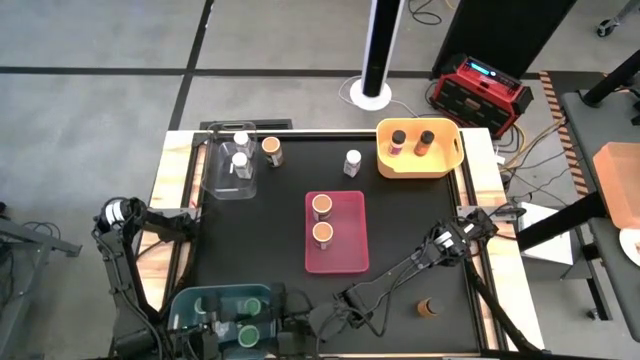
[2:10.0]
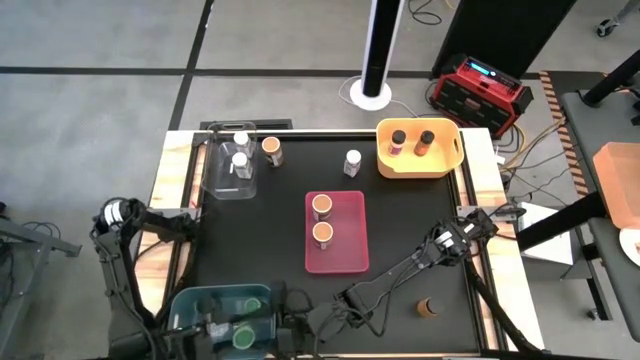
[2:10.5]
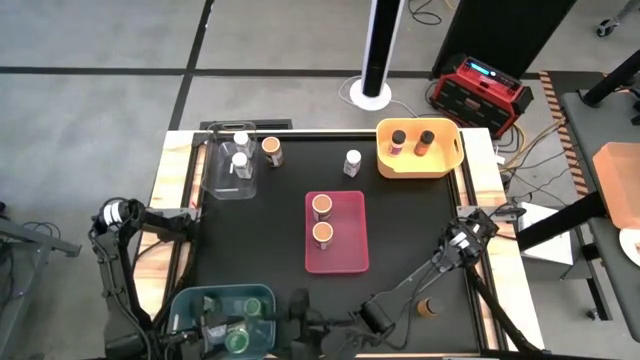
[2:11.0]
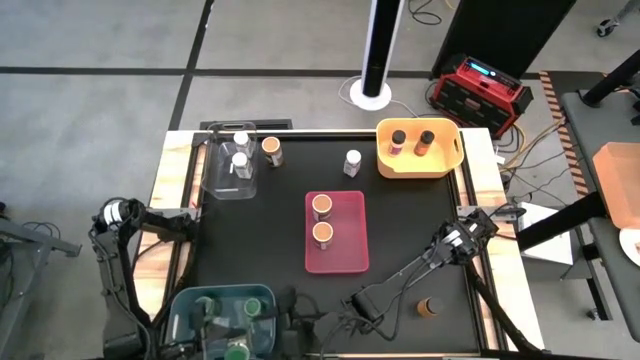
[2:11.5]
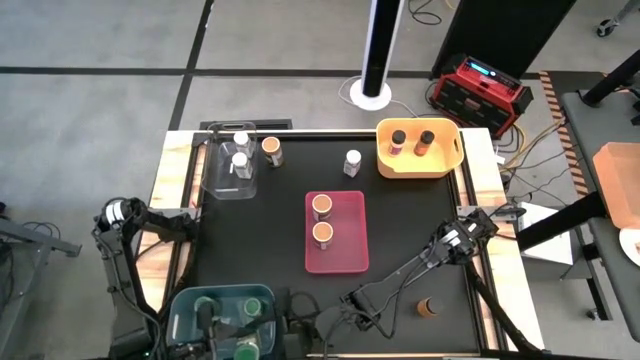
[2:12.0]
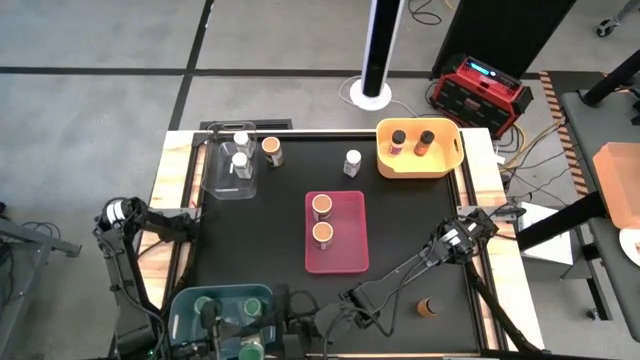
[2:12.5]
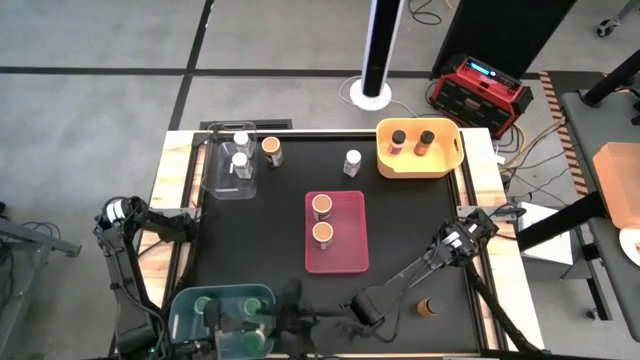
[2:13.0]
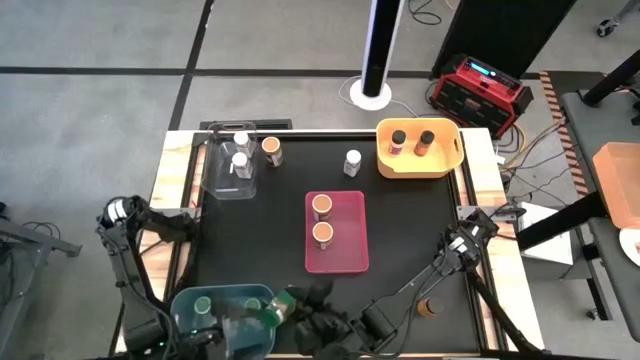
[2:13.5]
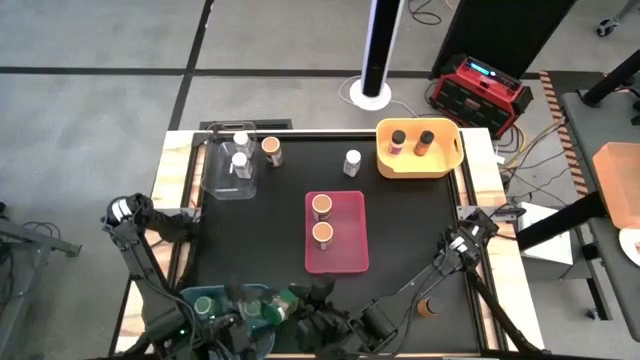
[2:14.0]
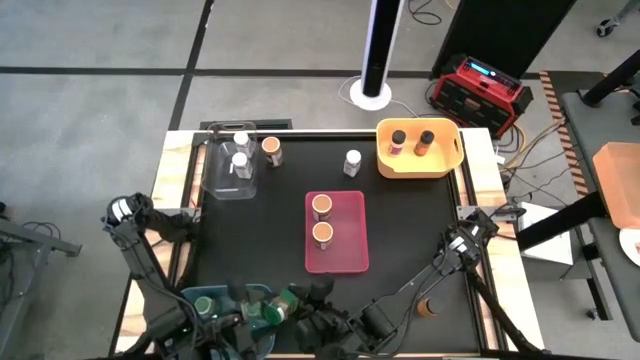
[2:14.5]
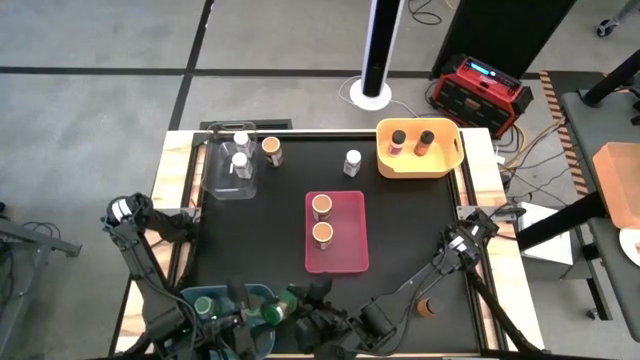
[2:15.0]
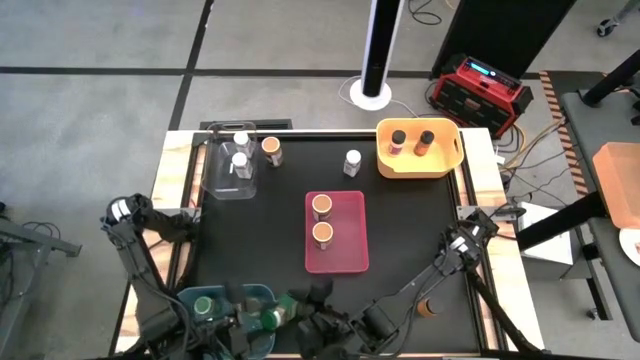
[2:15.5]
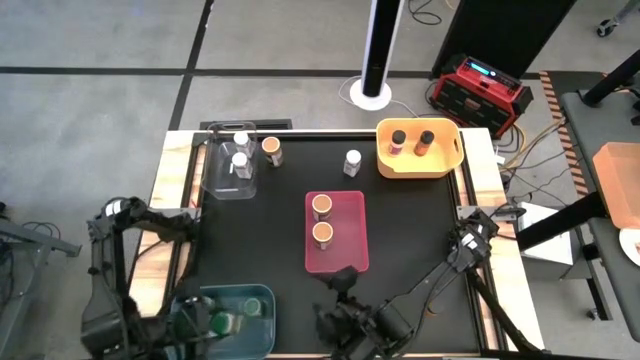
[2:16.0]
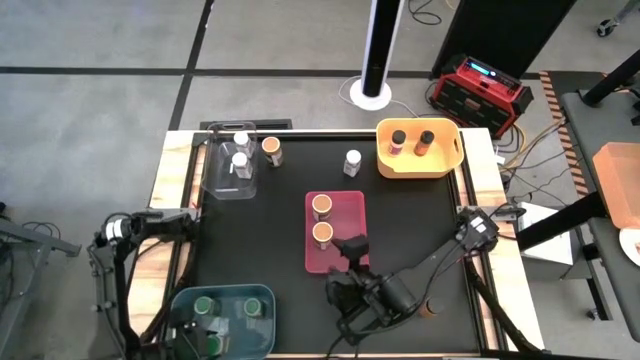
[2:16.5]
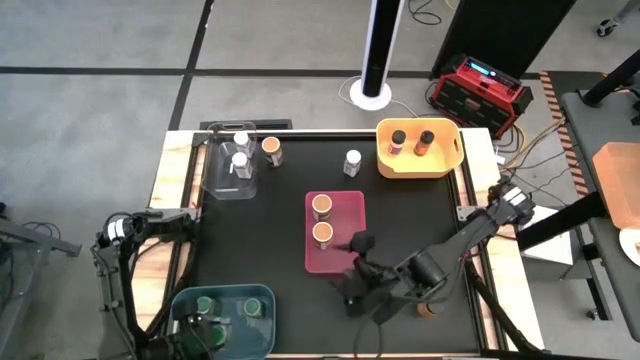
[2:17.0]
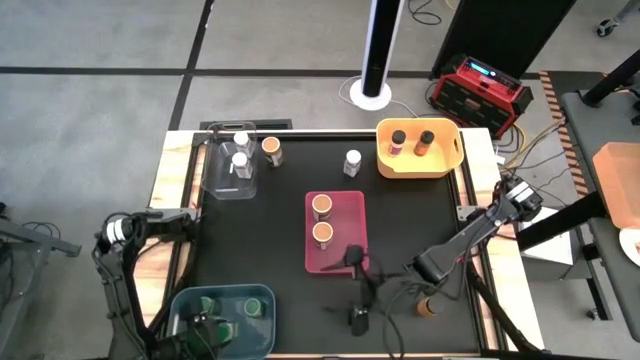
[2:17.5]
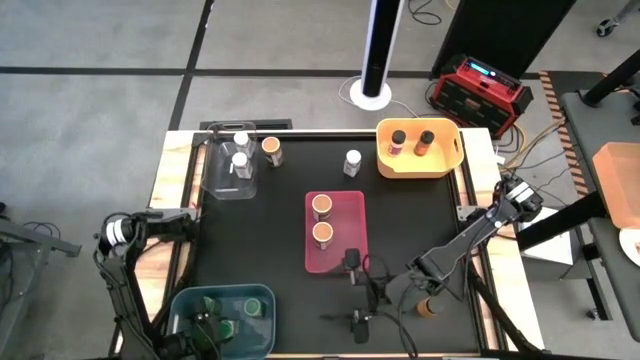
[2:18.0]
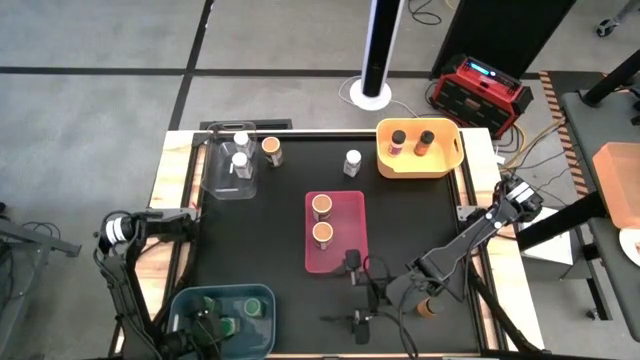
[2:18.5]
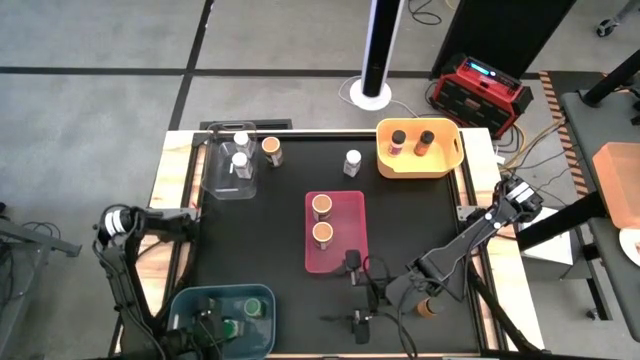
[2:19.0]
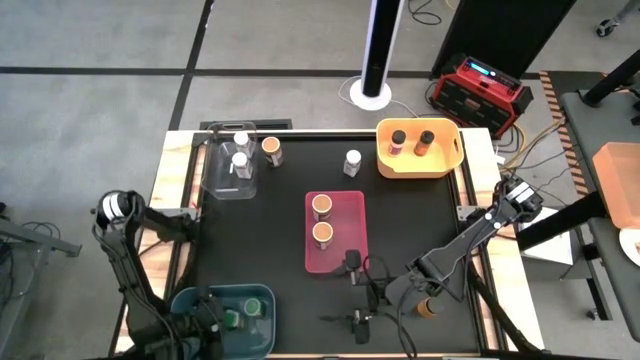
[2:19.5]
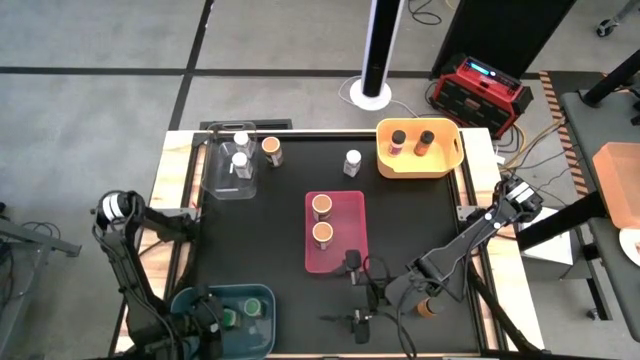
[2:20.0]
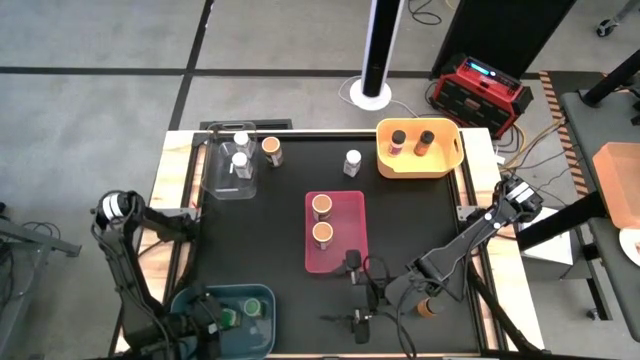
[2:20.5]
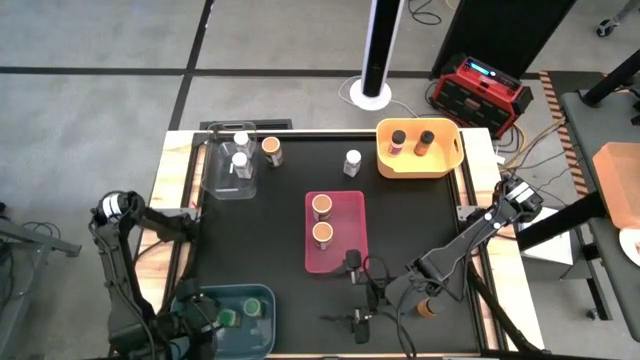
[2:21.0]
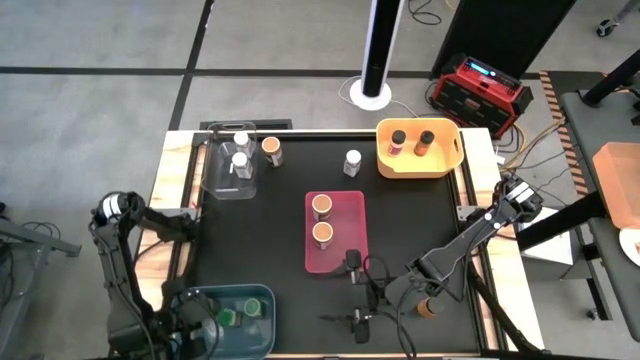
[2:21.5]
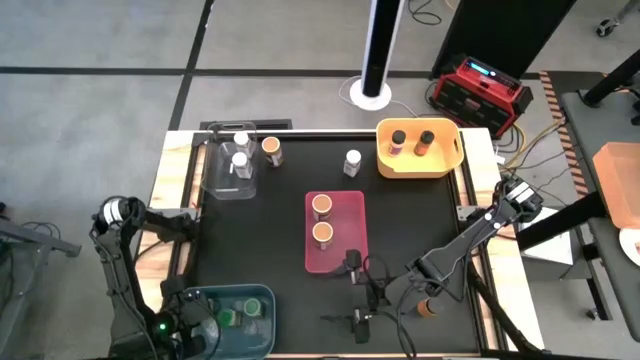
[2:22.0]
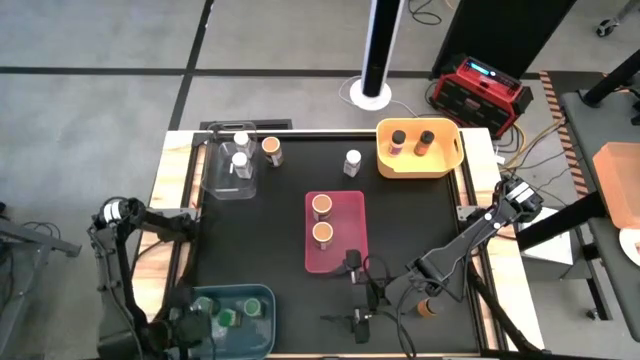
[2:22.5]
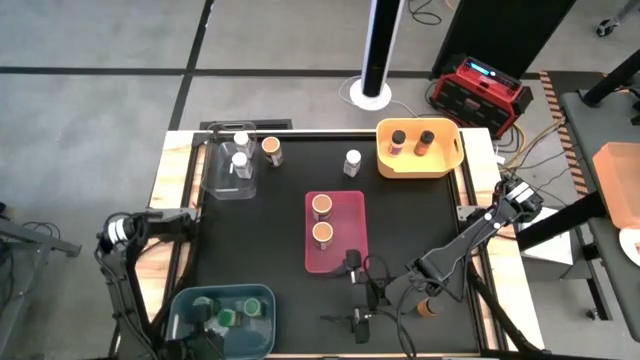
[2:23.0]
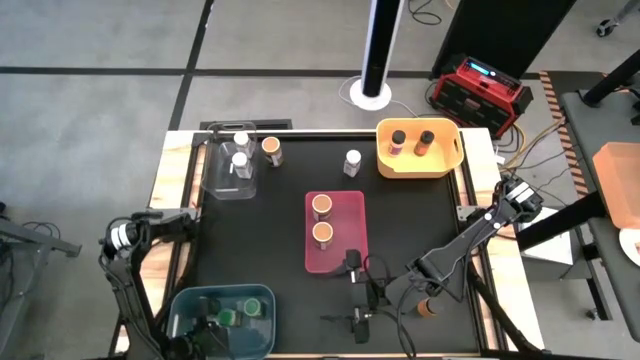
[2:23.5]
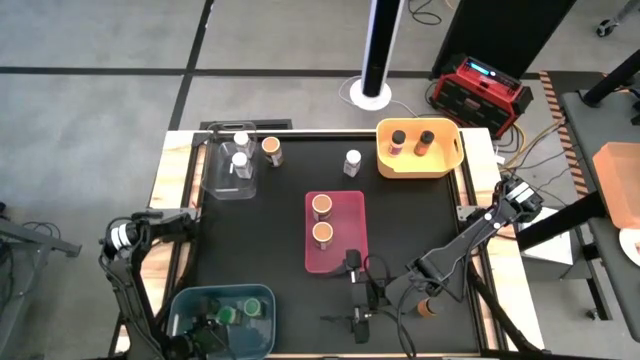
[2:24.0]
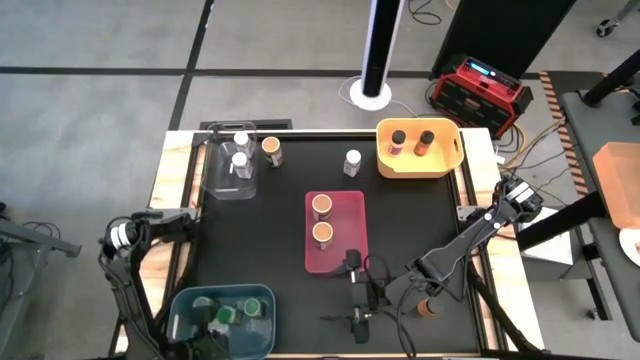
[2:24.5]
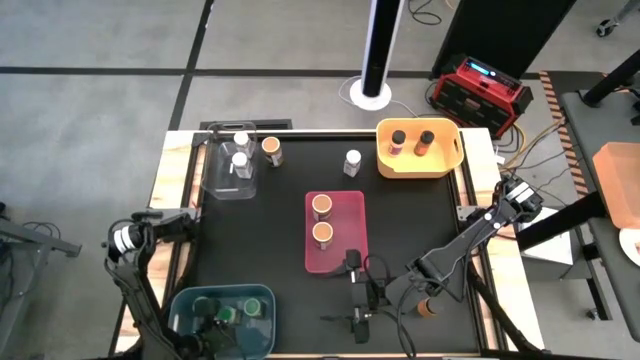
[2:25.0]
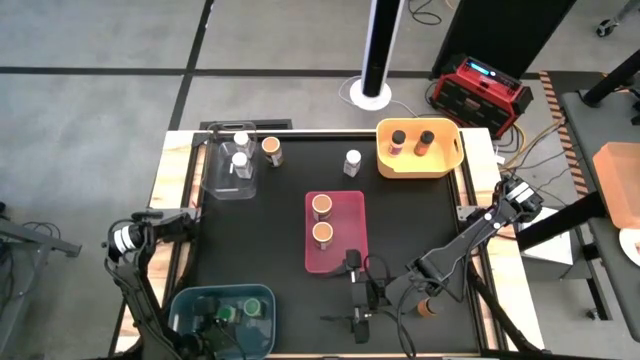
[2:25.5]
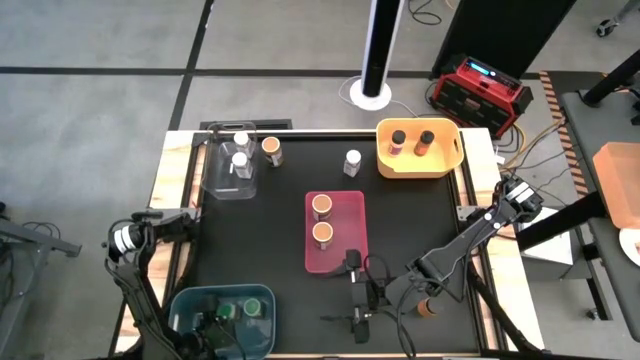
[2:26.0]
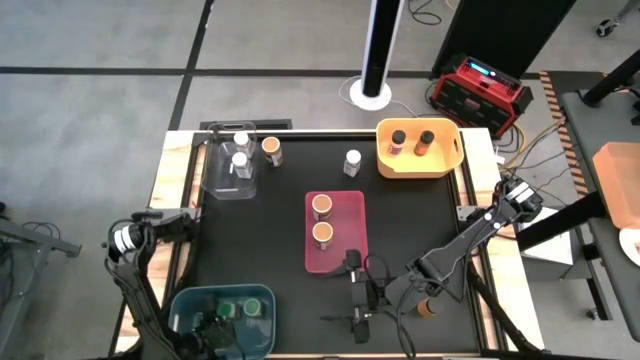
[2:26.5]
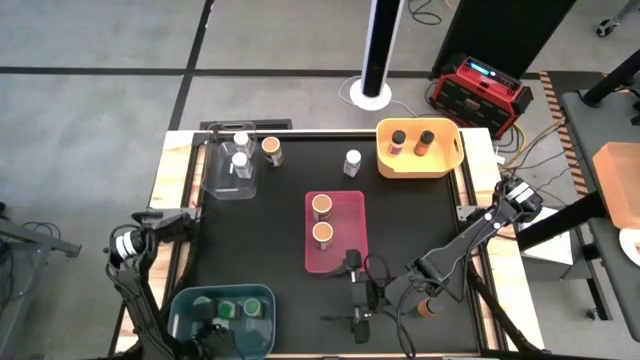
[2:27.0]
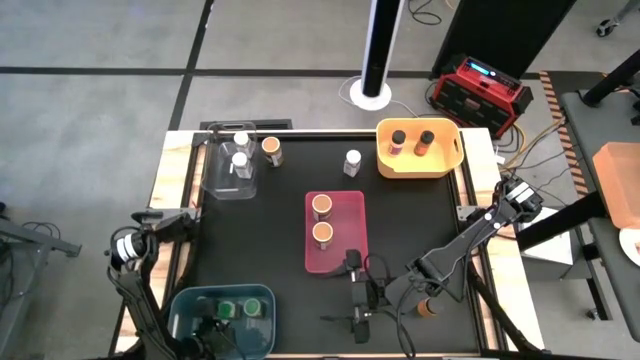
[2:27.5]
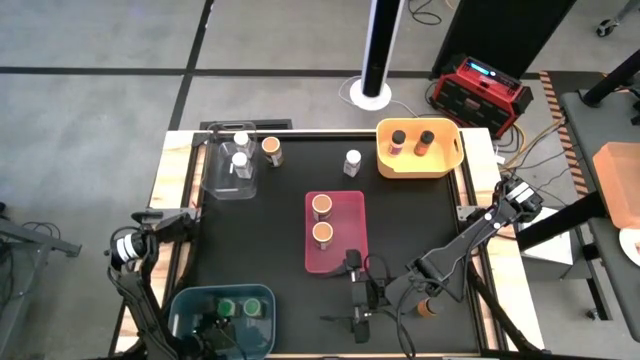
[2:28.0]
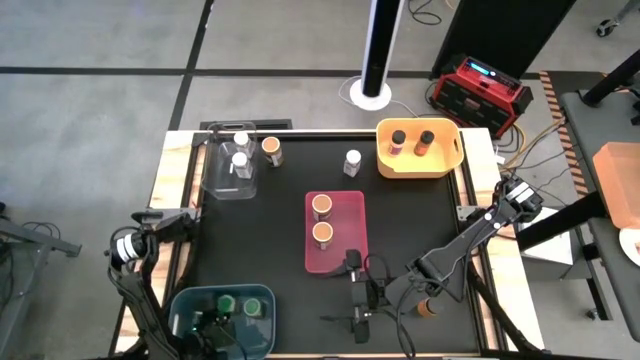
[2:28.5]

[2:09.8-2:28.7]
Task: Sort spices by type
Put the green seasoning bottle into the blue bin
